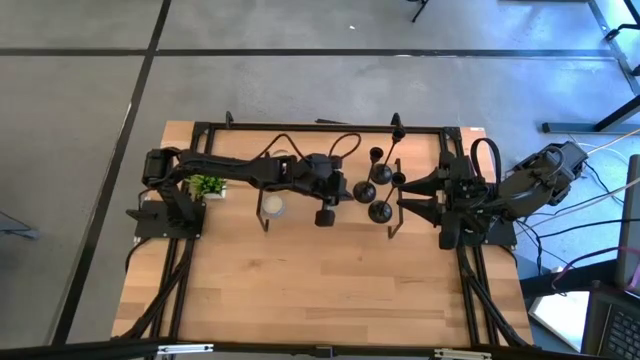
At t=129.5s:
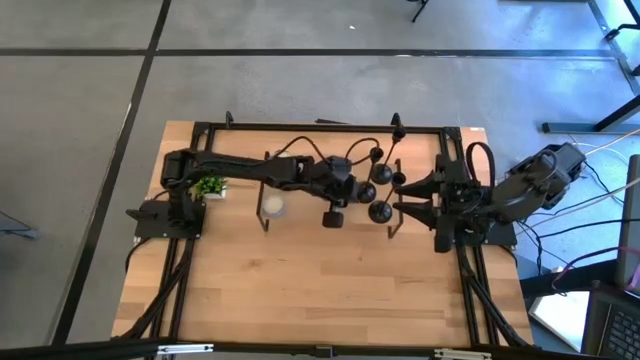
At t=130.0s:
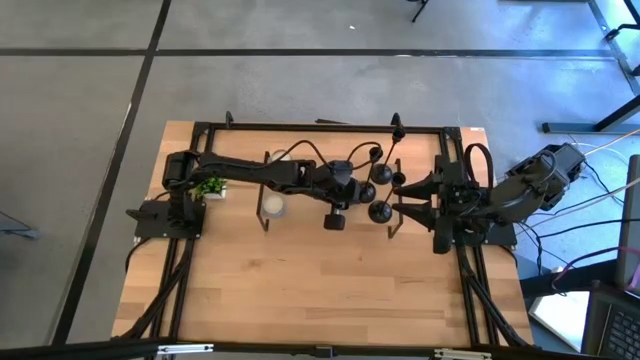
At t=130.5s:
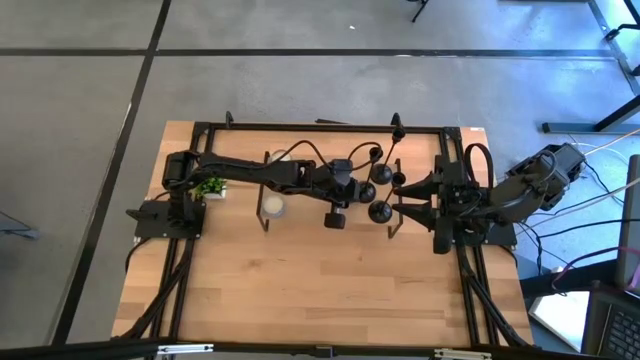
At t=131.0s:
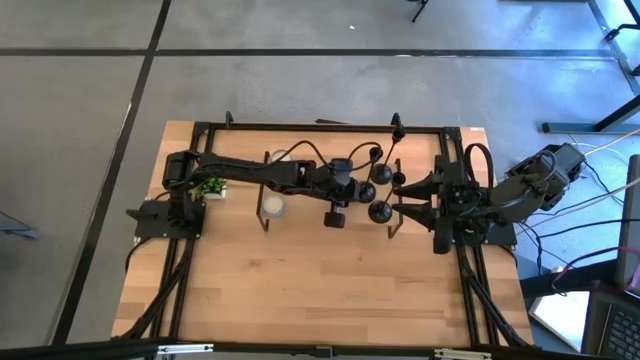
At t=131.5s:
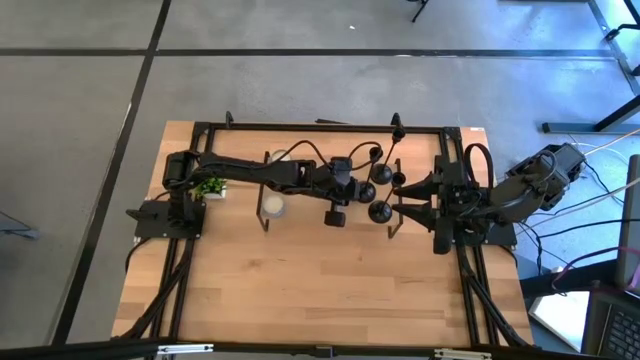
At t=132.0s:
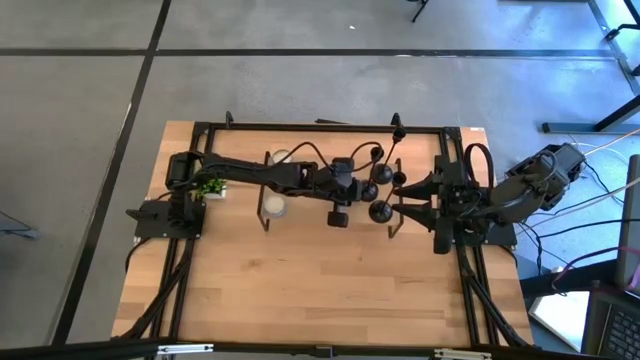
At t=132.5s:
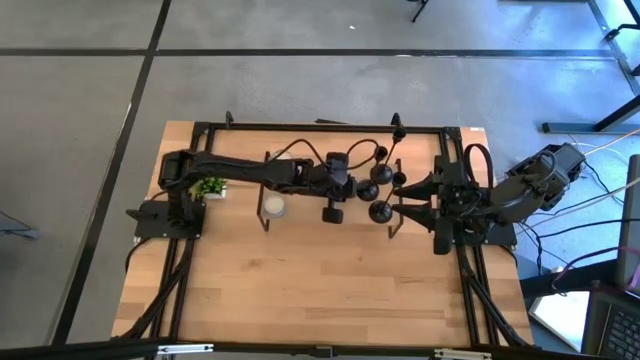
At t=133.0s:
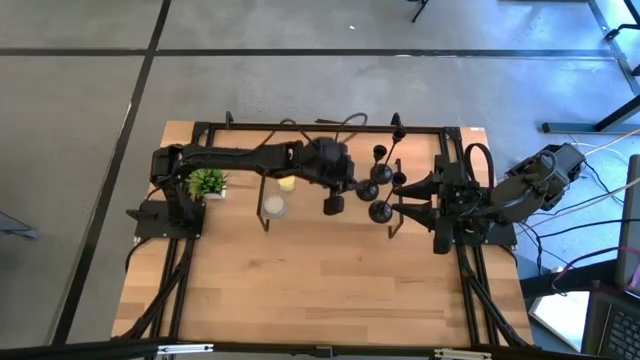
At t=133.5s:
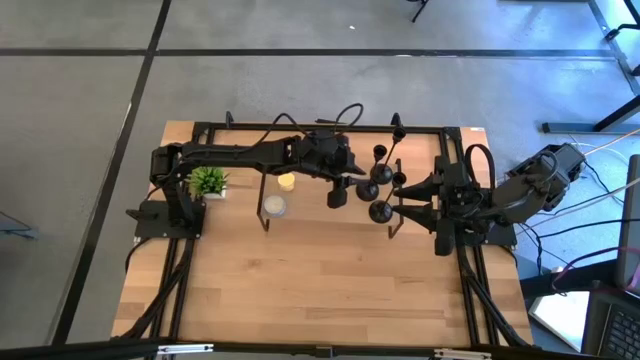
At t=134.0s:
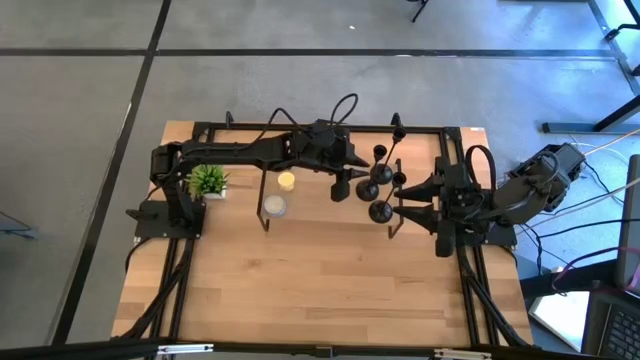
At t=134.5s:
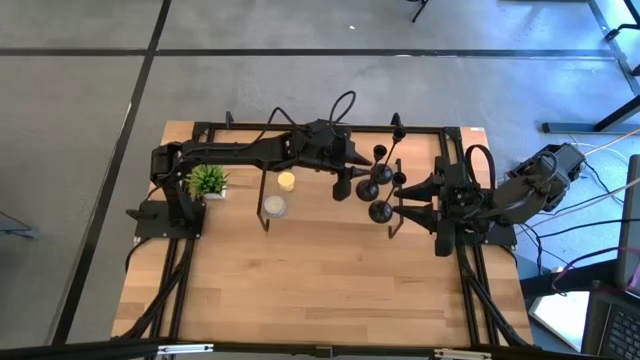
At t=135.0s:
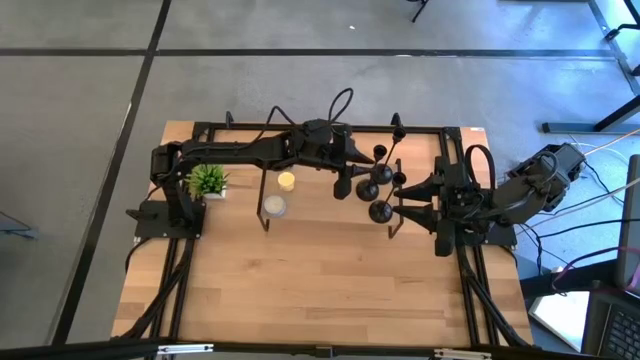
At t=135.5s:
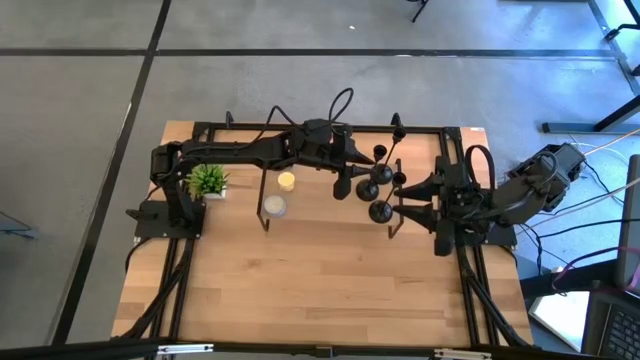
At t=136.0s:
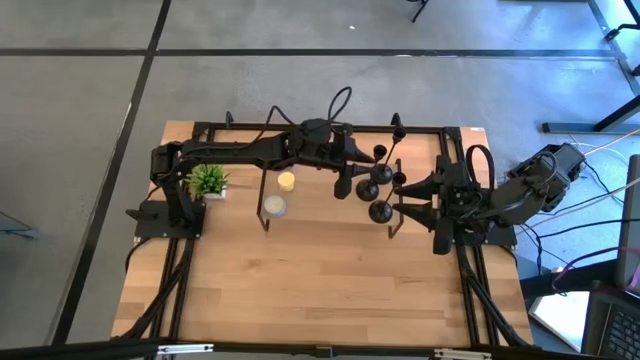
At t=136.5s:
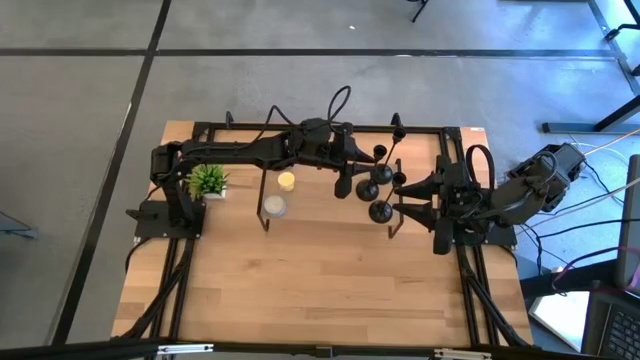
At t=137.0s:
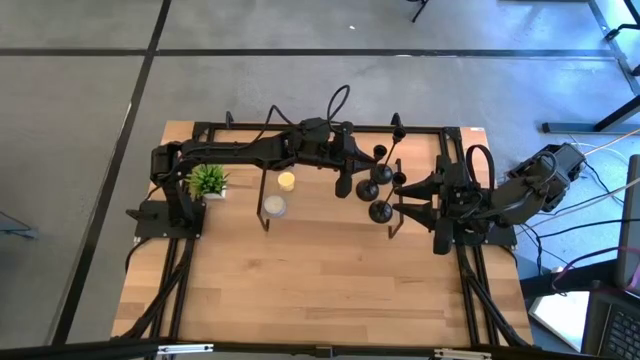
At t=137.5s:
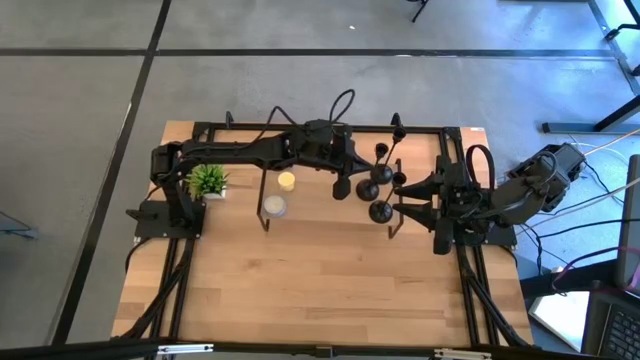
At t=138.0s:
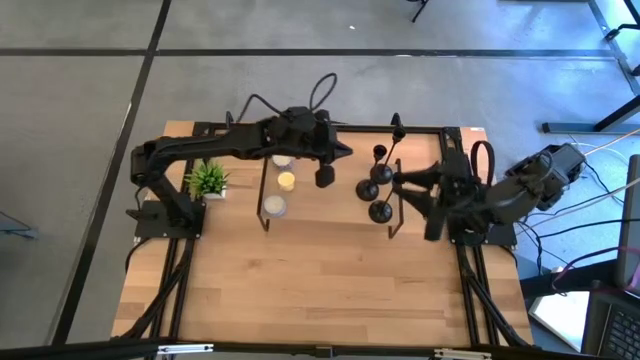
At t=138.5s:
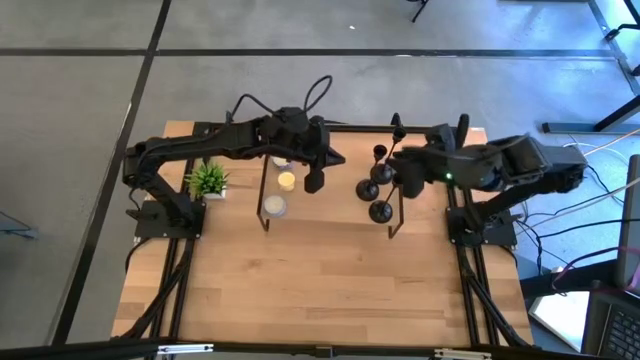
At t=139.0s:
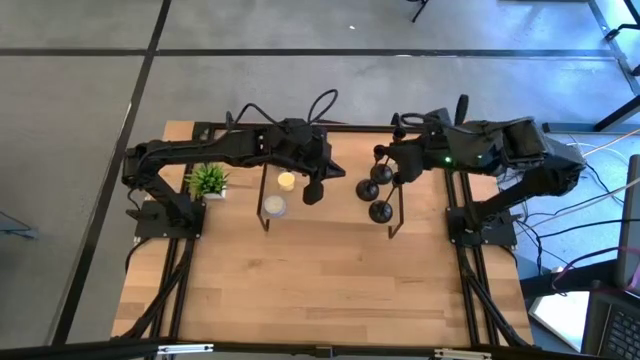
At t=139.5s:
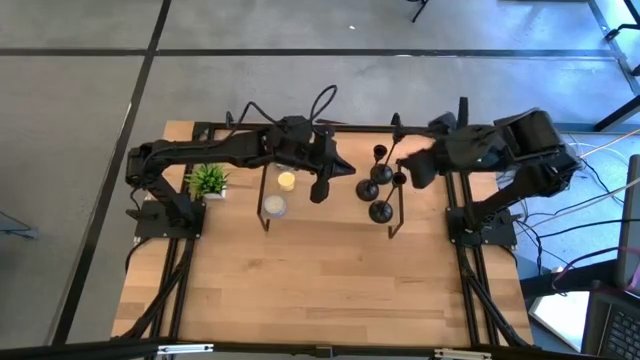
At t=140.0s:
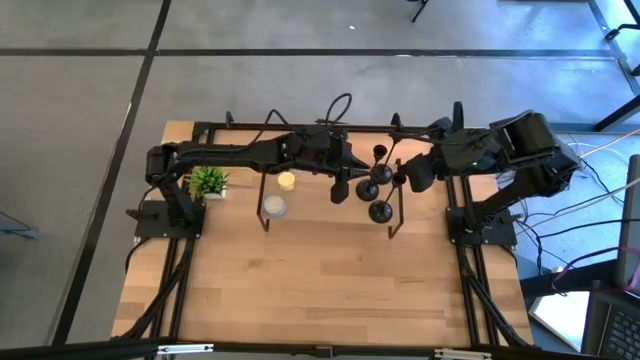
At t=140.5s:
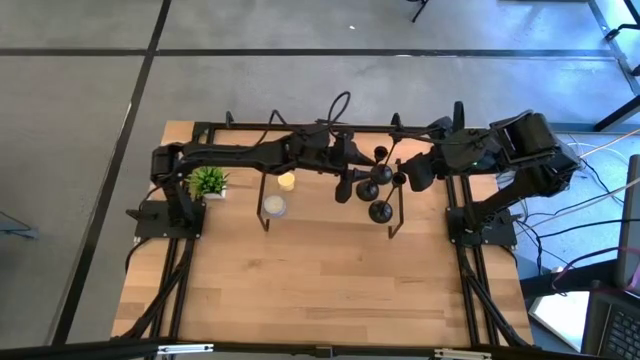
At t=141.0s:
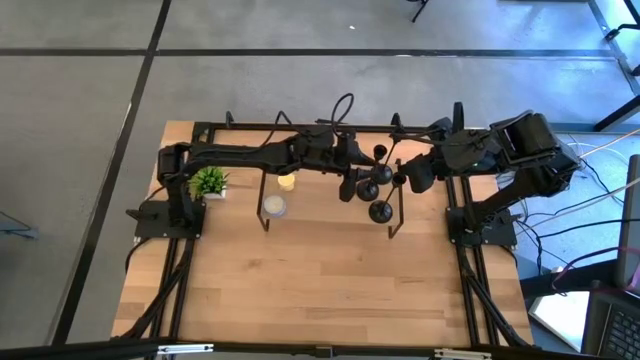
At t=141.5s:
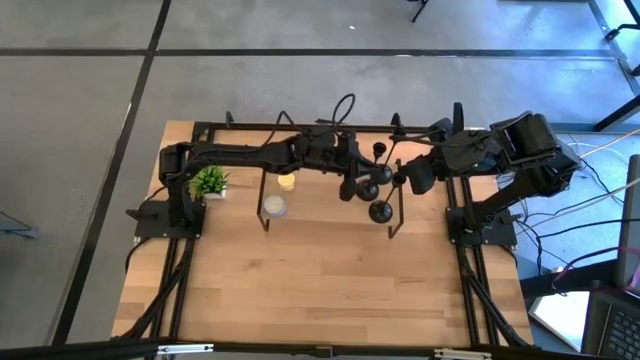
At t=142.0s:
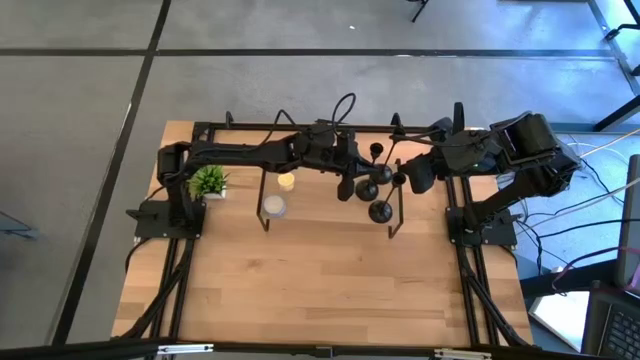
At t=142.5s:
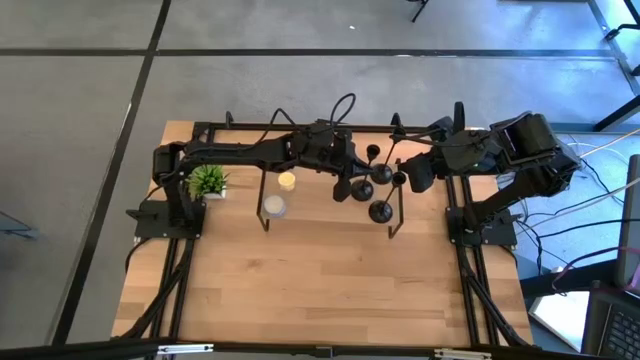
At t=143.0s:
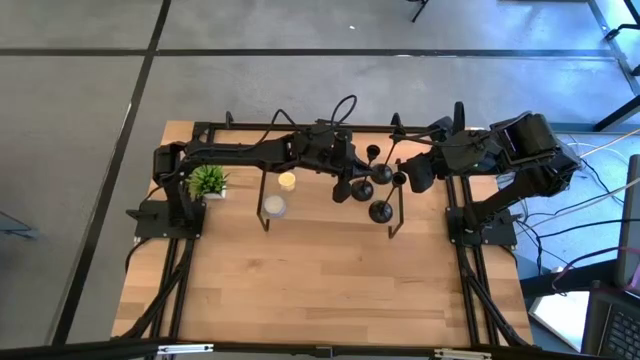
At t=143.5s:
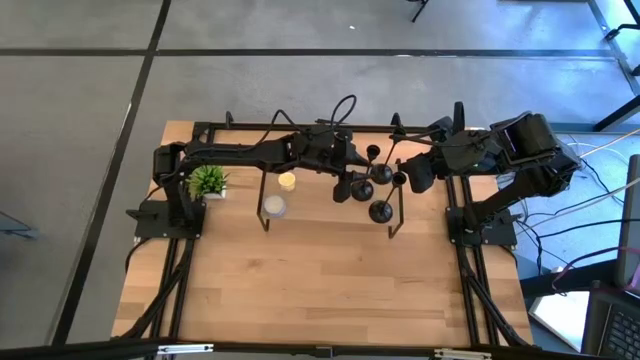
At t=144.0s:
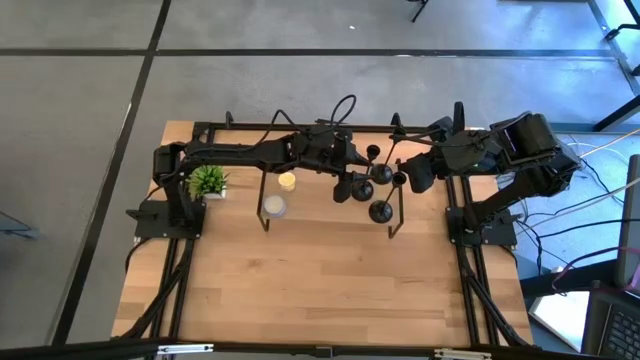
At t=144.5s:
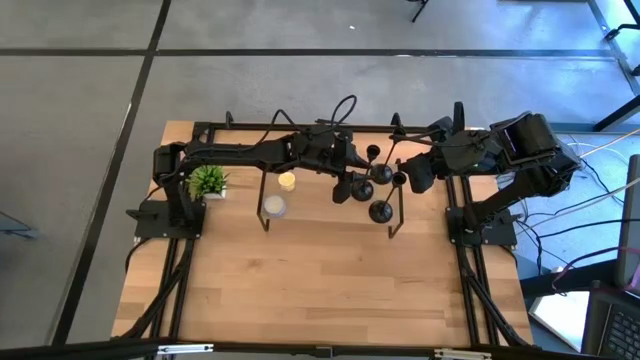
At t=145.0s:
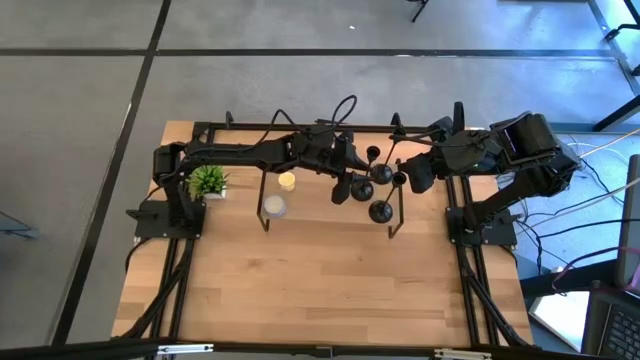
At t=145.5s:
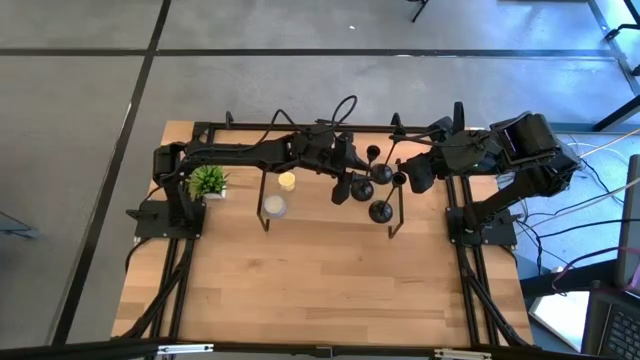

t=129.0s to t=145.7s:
Task: Pick & Place candle stick holders
Put the black candle holder on the shelf
